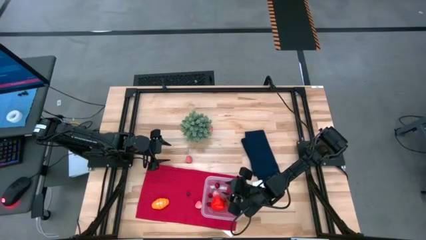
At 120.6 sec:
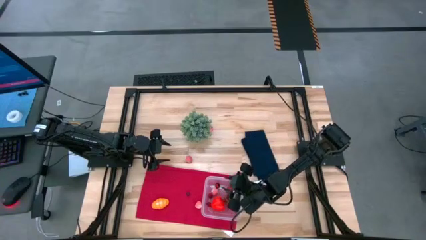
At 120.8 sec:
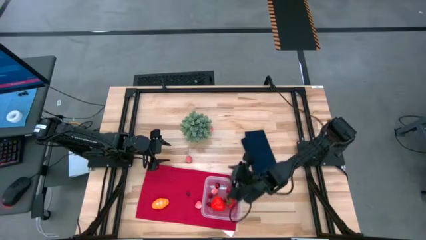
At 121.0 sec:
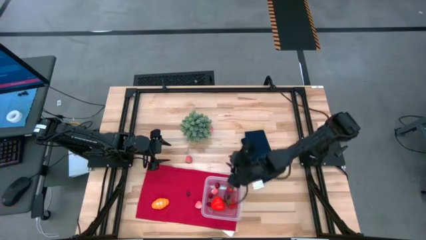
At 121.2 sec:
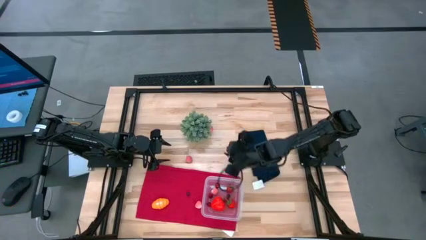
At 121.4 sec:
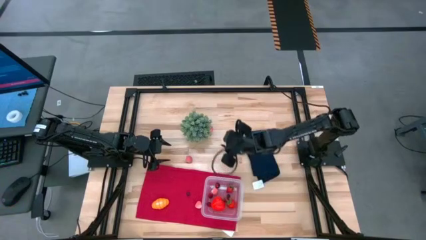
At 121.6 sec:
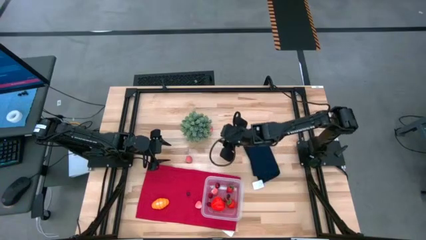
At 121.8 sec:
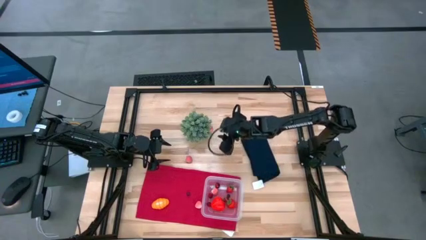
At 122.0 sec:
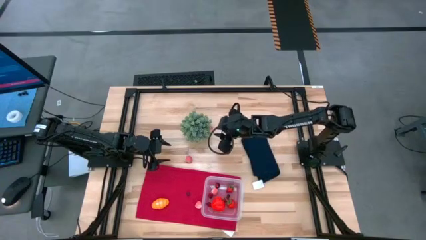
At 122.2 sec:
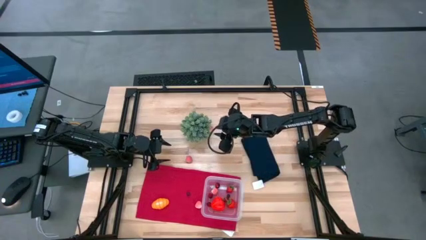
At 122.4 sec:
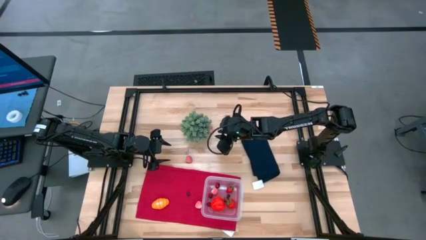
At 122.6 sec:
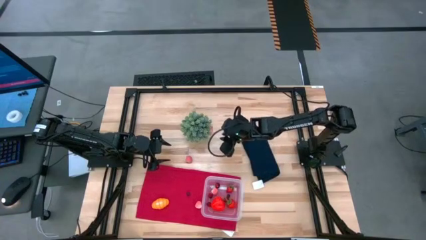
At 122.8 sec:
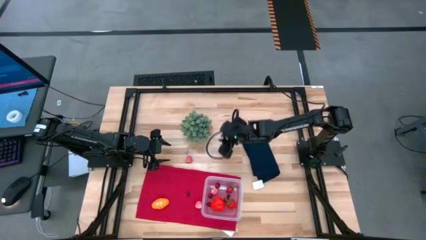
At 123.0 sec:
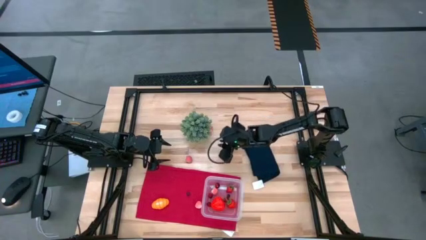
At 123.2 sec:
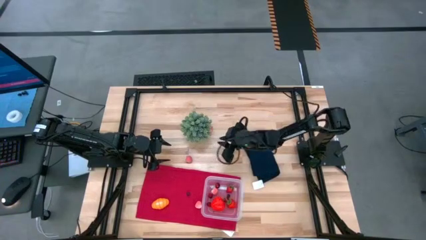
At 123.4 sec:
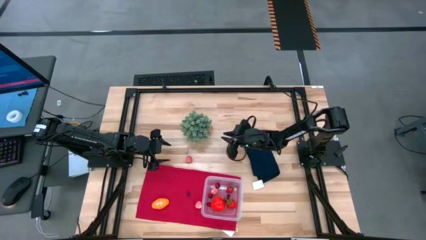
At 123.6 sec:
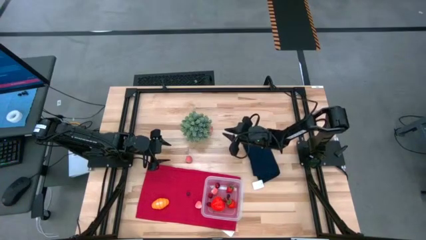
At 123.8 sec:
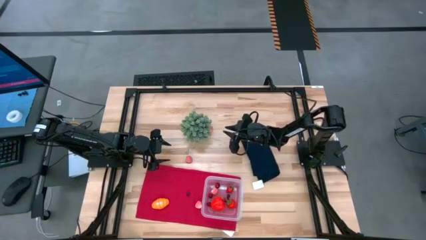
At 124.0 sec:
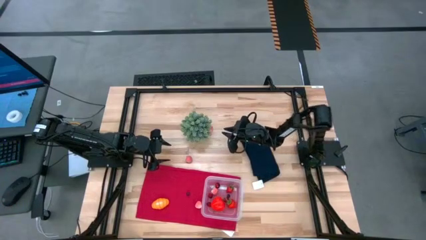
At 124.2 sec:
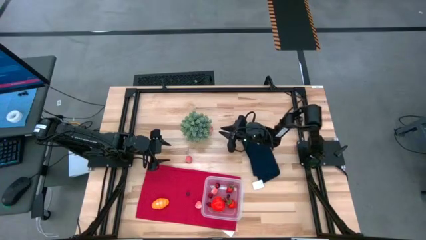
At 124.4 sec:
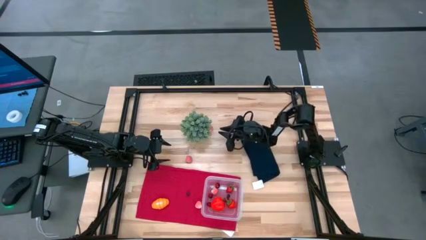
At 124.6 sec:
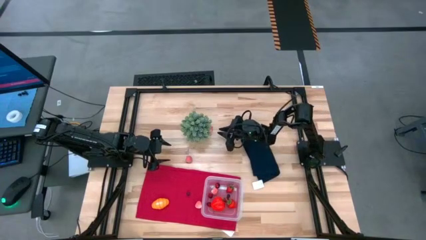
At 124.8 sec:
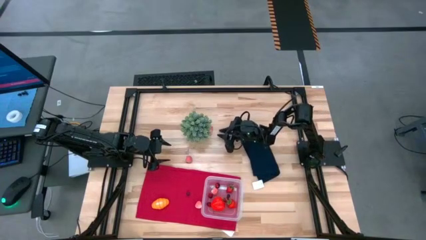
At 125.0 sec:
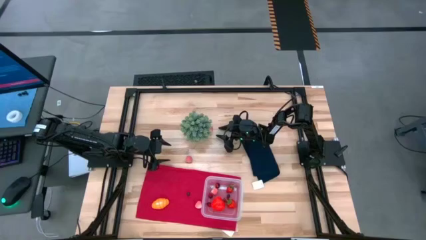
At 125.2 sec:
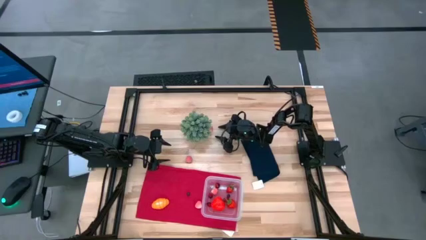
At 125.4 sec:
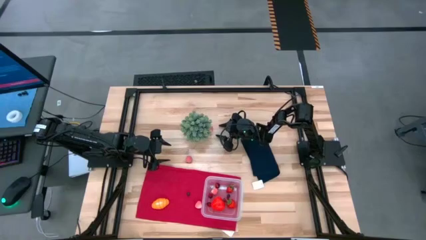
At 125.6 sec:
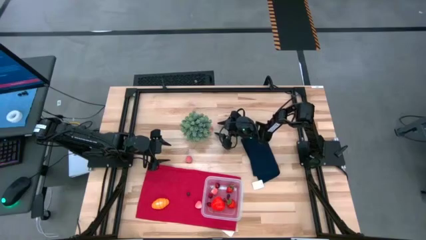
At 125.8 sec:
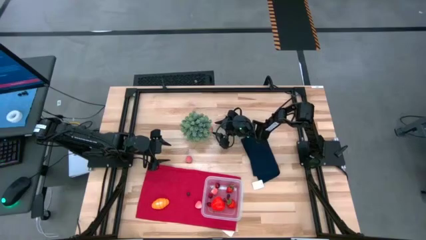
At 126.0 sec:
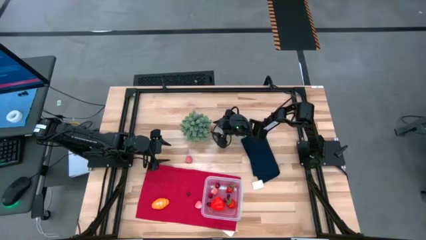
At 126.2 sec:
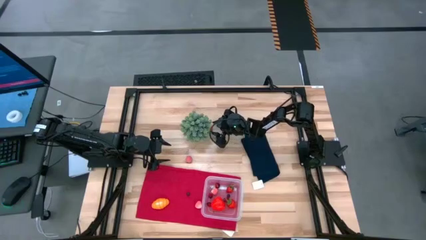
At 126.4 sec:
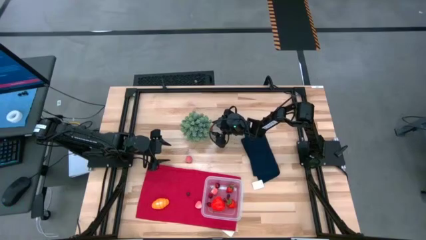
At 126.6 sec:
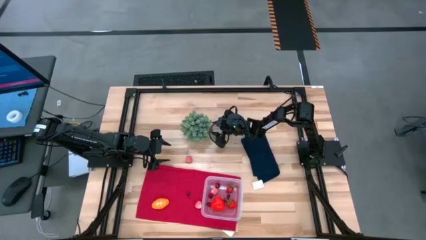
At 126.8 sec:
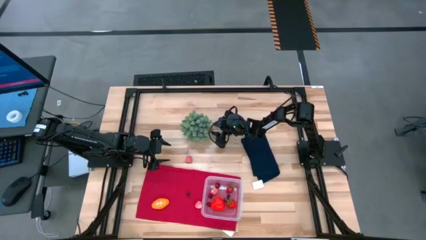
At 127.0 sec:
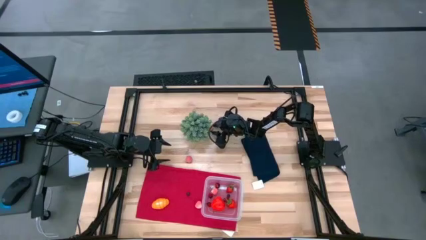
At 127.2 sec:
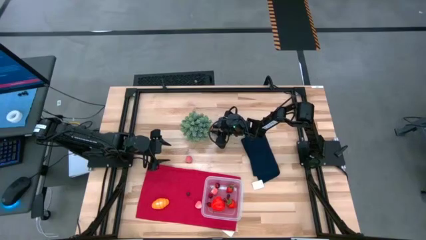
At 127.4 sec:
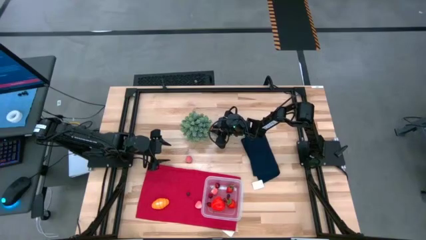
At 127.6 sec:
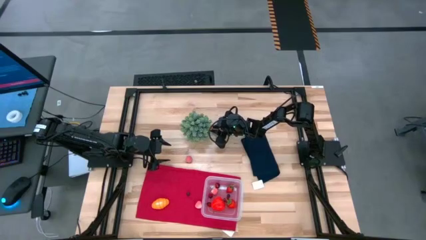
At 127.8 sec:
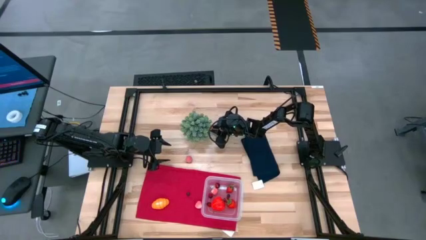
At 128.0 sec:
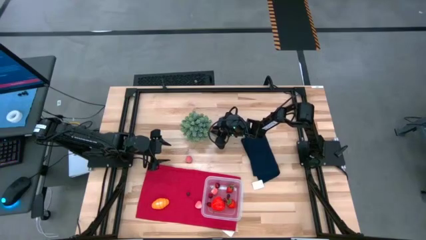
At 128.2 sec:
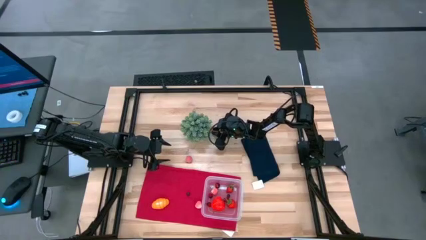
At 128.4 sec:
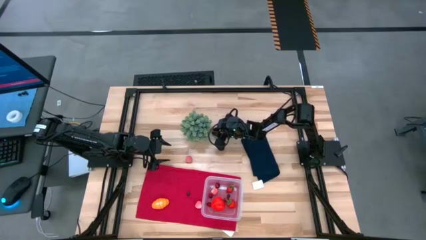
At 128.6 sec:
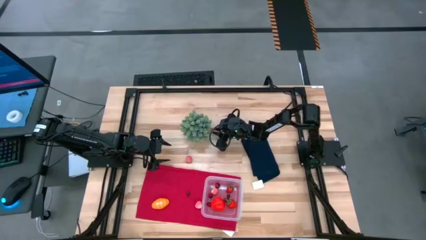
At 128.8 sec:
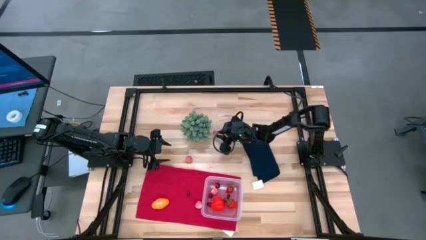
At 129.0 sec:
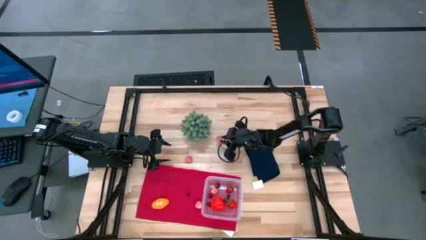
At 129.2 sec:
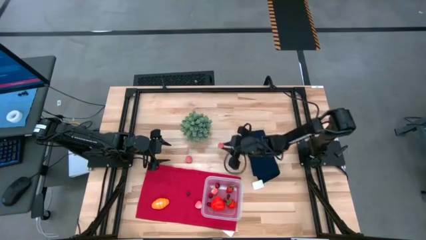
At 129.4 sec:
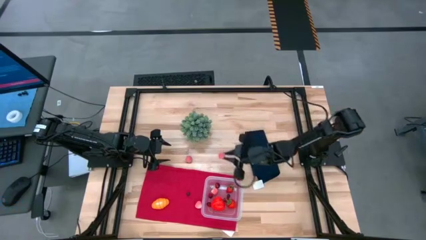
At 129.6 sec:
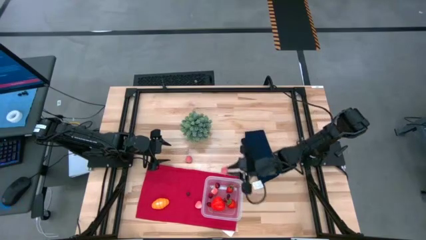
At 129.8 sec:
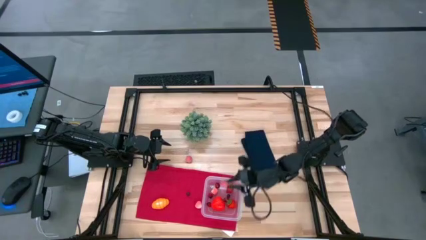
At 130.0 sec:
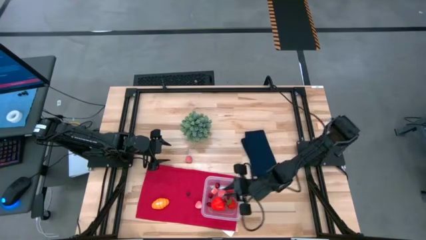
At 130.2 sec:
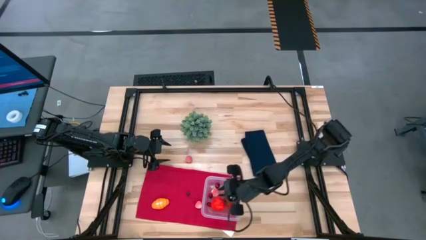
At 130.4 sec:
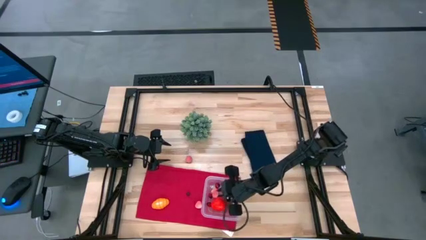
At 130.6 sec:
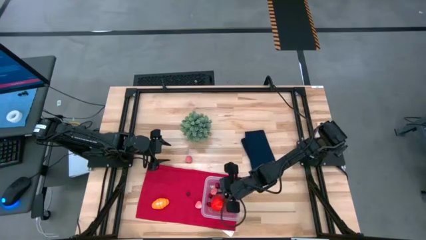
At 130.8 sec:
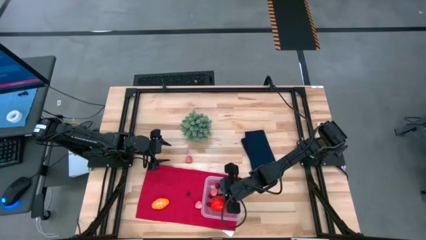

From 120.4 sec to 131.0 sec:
Task: Pick and placing Produce into tupperware
Put the top apricot into the transparent bin

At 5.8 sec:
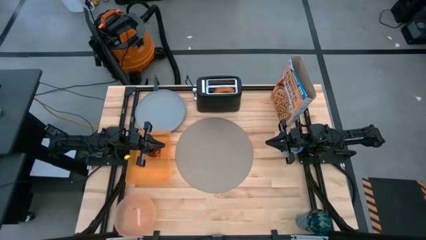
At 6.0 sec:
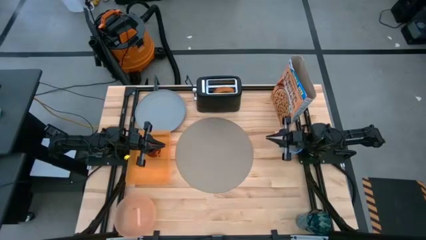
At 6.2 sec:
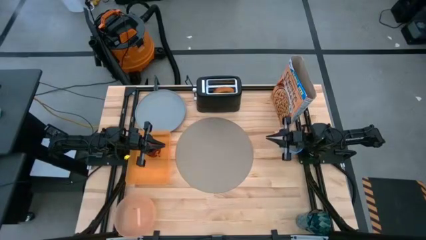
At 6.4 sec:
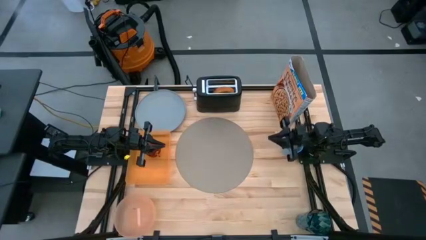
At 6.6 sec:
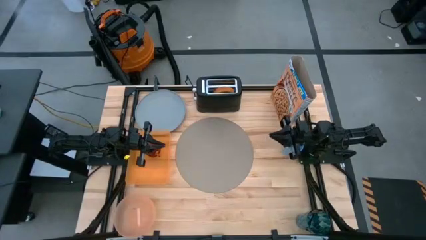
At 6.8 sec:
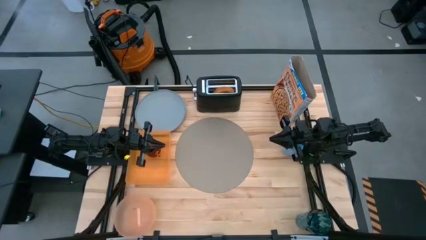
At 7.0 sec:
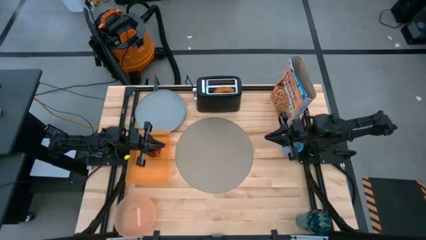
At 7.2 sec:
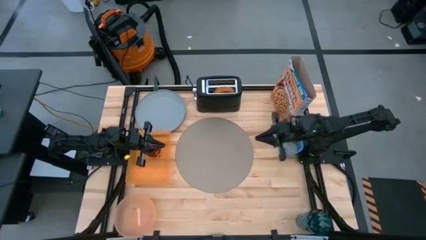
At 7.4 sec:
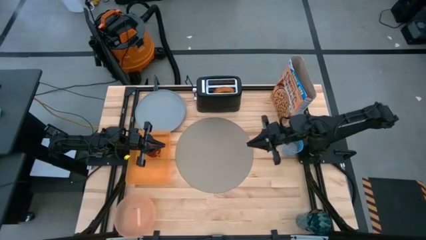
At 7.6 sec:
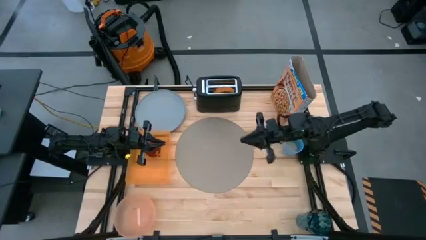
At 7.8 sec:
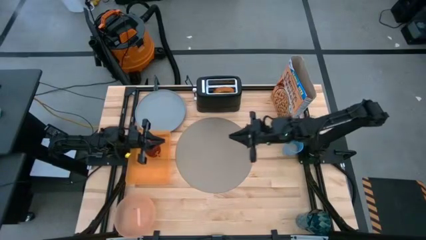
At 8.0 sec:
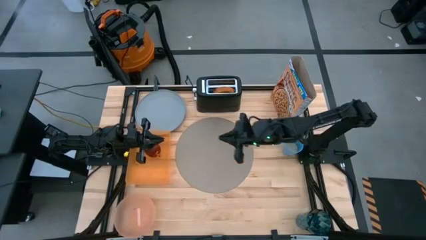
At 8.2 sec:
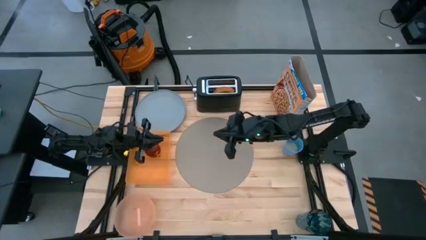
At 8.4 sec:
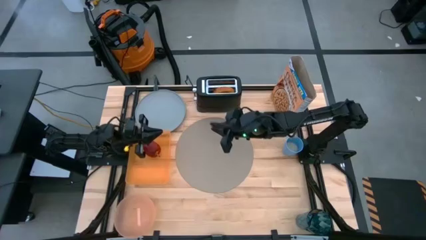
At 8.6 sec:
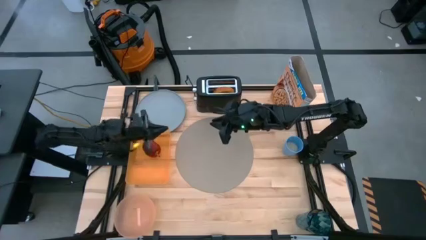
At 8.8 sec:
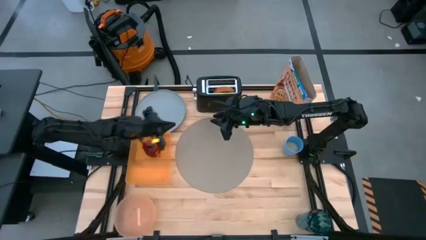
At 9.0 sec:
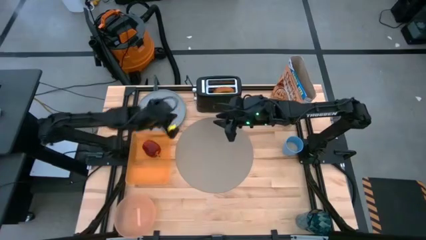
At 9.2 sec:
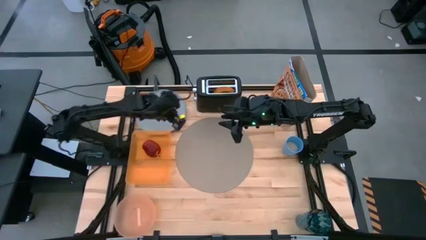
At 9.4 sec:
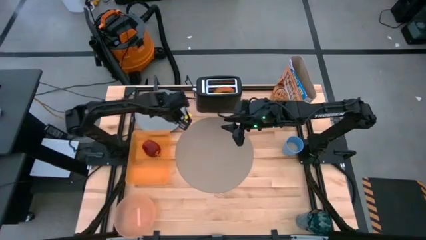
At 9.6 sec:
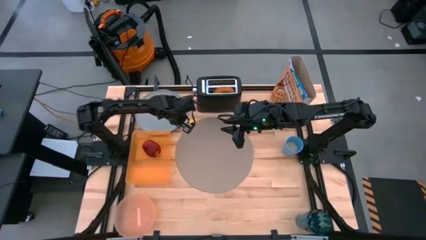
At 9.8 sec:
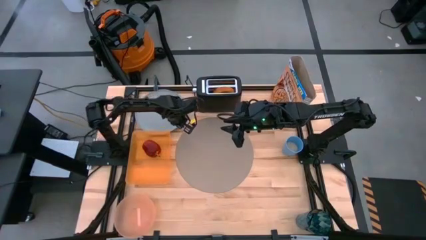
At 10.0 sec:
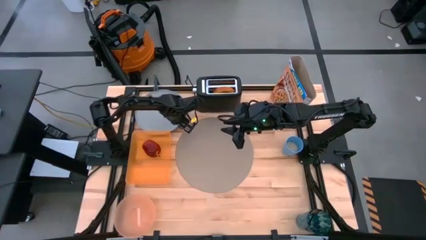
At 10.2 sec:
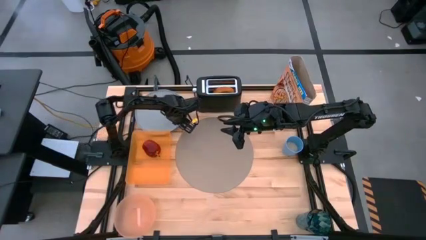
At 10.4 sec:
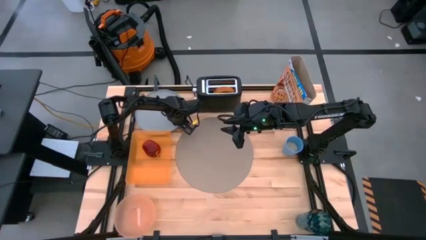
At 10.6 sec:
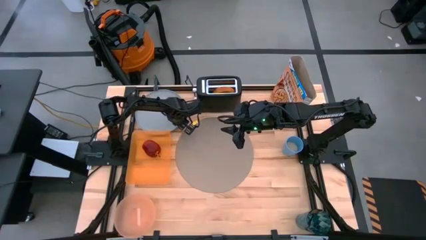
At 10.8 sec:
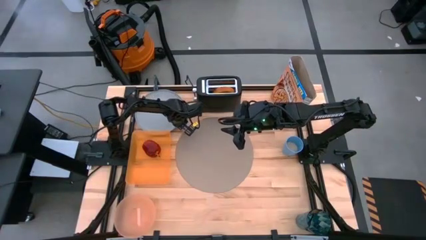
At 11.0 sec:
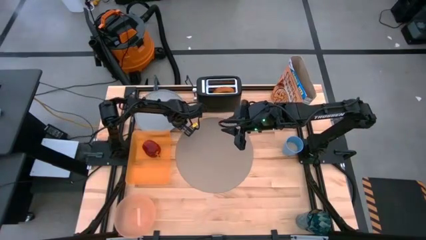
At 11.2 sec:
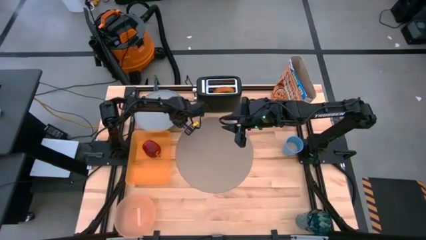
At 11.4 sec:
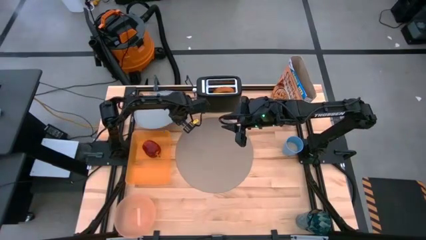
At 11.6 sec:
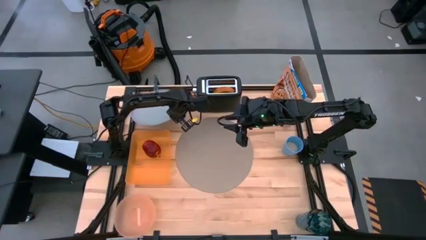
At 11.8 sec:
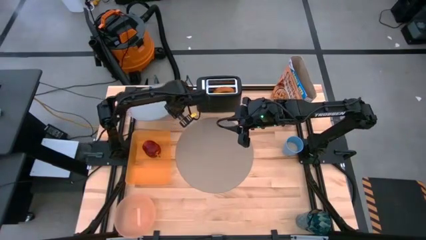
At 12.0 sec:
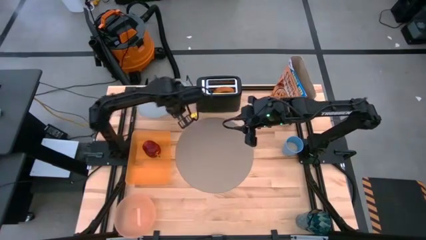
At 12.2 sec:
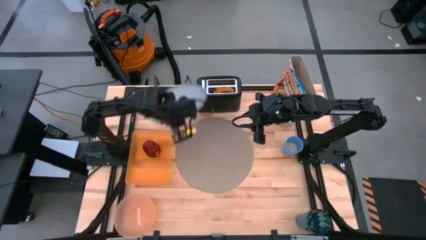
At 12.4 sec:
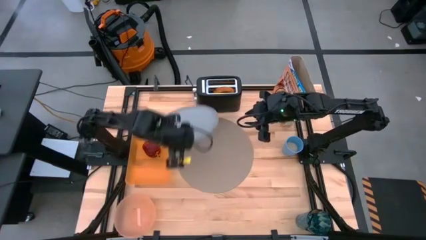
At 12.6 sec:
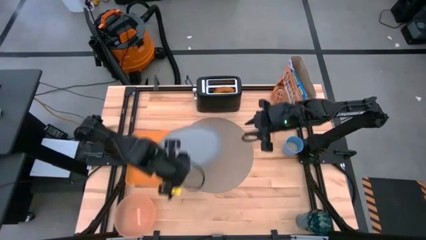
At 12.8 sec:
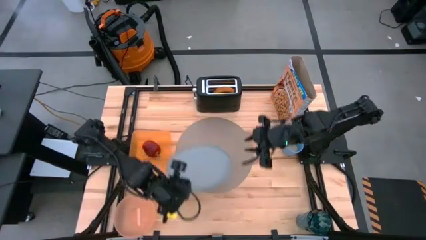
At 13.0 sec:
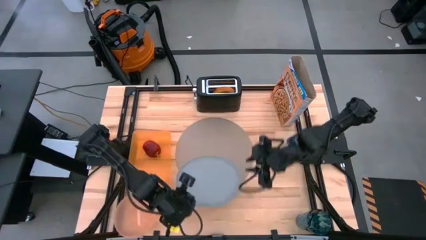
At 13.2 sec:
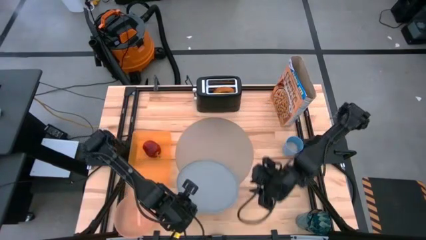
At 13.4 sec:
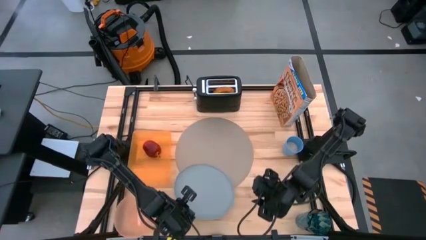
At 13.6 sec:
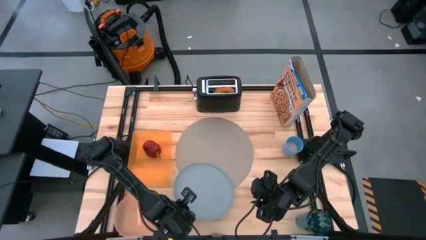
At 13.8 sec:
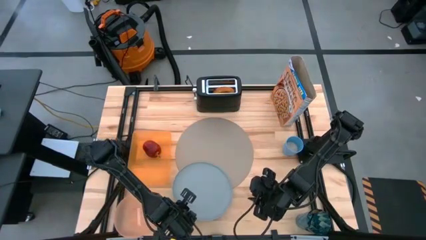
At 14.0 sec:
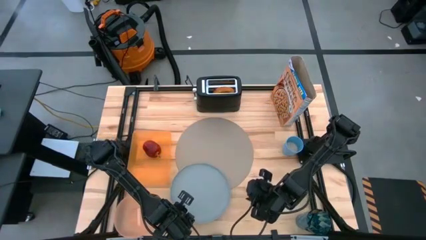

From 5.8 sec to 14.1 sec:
Task: Arrange a breakfast setting
Put the light blue plate onto the gray placemat
